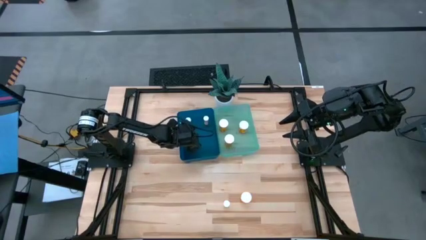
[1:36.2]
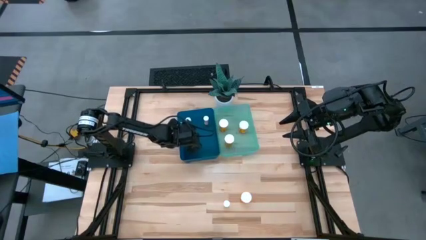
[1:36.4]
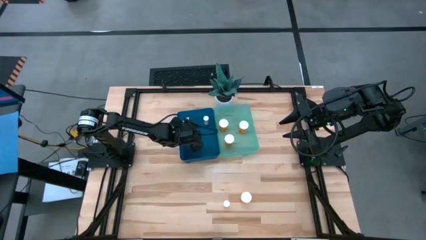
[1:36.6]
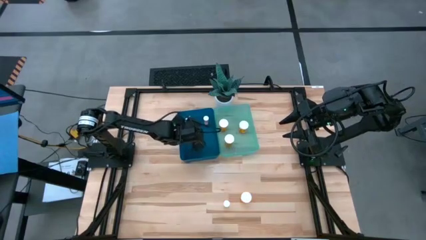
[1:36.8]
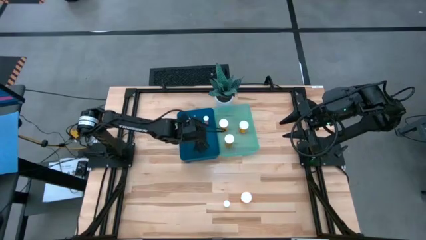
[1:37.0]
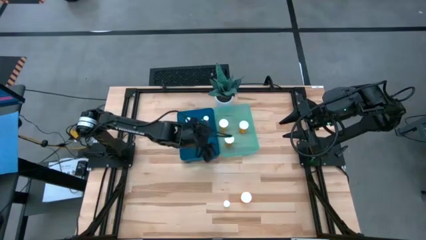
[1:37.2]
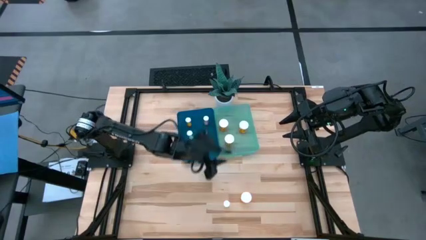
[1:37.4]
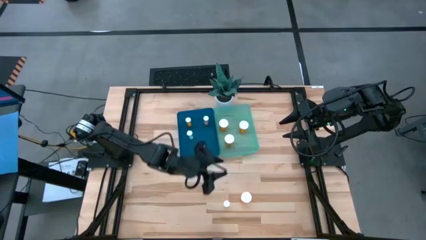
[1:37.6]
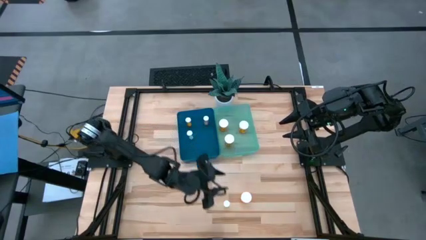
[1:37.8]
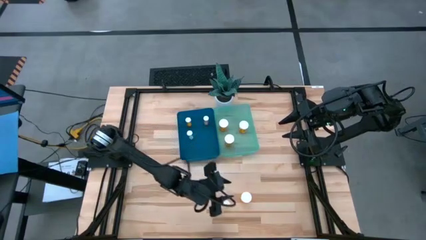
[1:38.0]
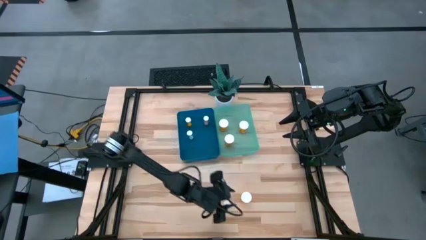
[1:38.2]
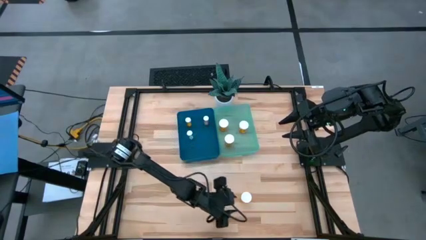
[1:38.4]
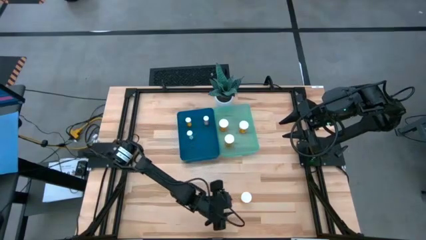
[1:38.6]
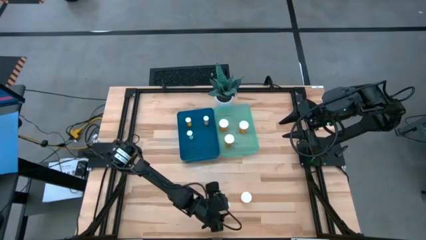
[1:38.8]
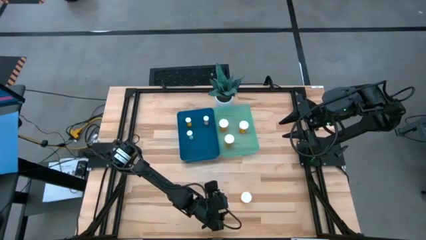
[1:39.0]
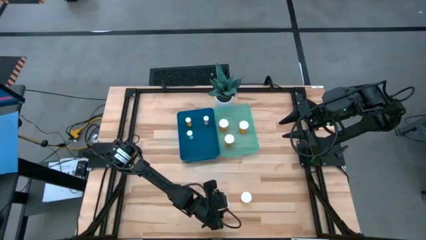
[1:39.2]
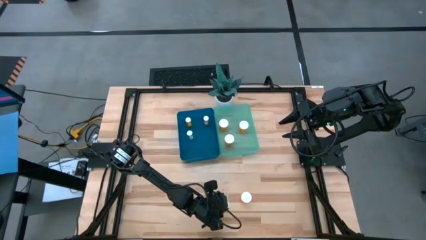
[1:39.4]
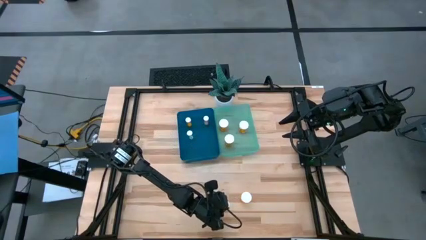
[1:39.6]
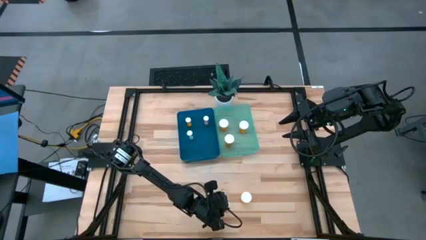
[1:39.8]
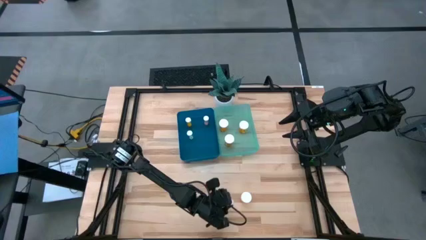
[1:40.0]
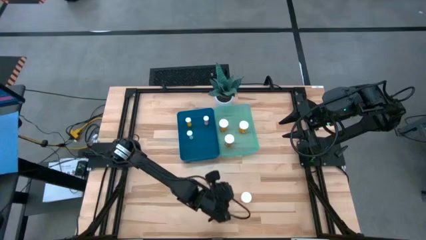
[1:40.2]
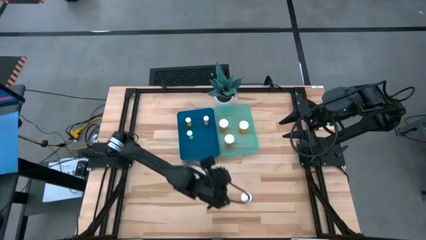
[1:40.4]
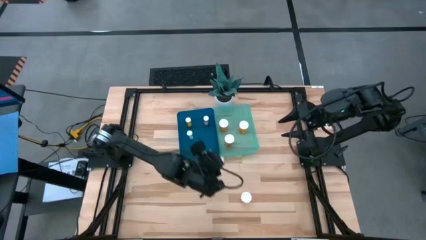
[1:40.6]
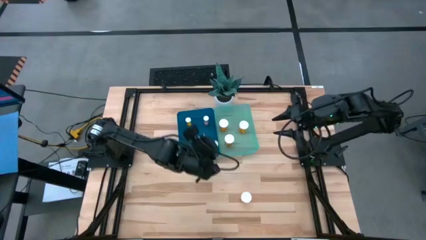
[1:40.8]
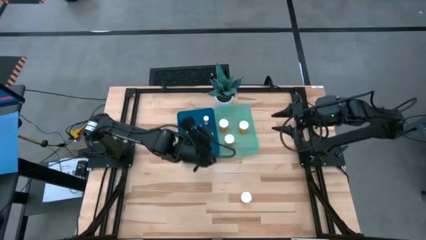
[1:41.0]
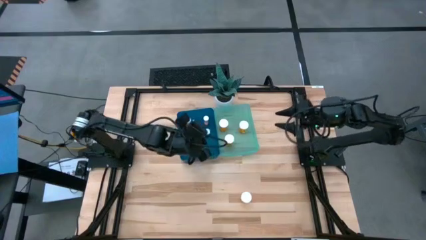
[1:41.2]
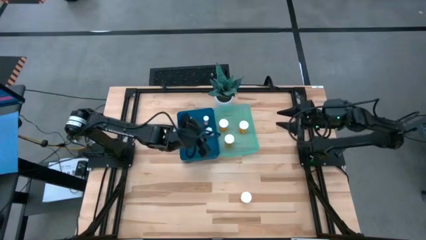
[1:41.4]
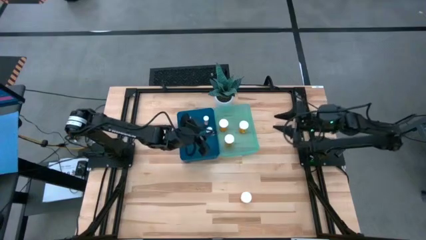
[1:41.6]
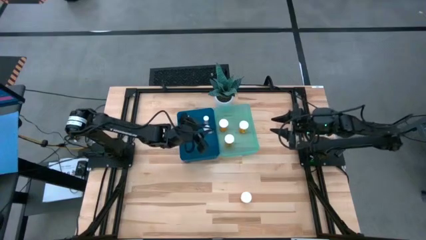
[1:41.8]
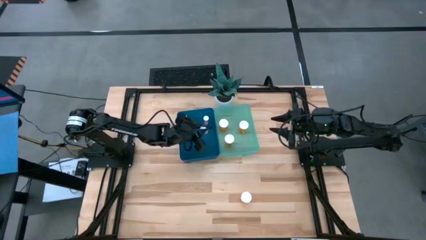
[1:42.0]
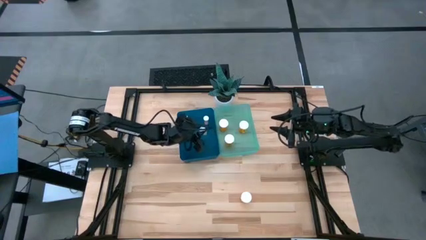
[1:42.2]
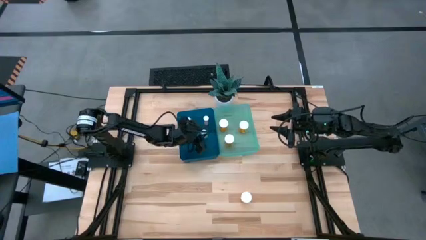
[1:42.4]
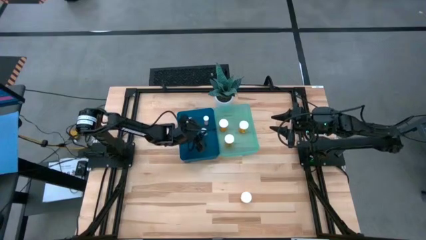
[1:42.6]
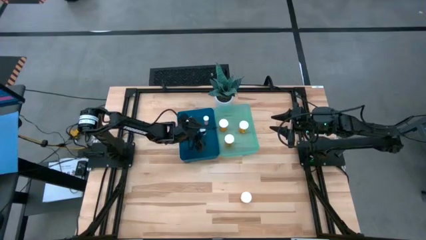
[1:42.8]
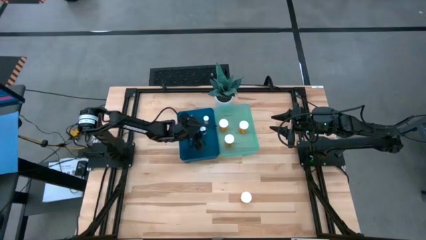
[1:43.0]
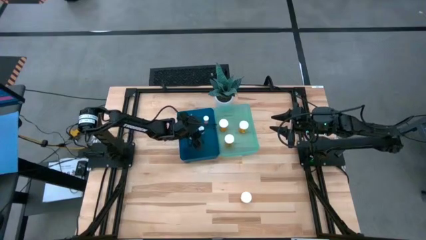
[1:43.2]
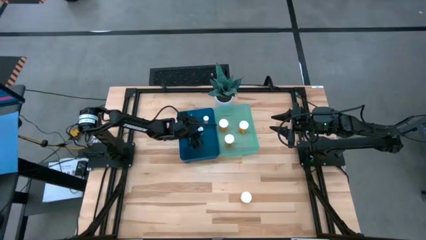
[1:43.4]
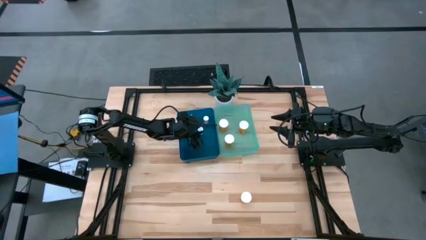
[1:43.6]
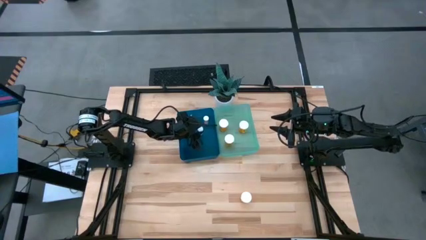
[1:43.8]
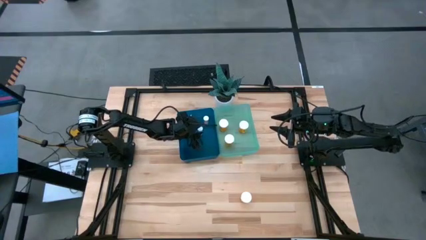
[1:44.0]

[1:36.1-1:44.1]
Task: Pick and place medicine bottles into bin by pill shape (circle, oval)
Put the small yellow tablet bottle into the blue bin

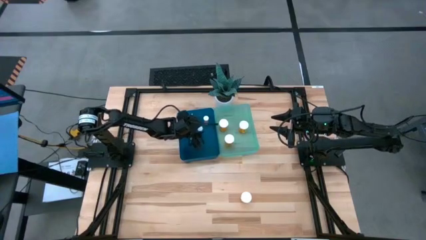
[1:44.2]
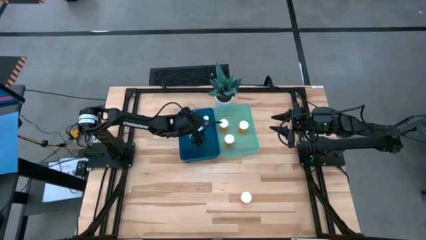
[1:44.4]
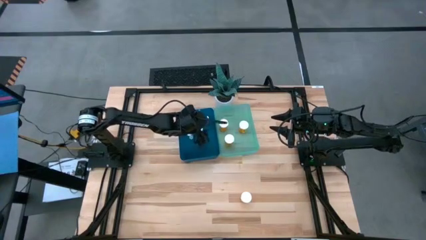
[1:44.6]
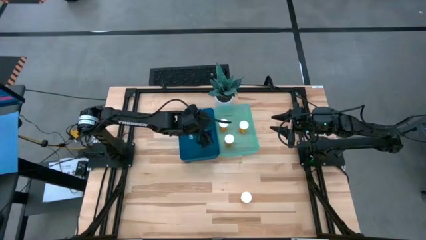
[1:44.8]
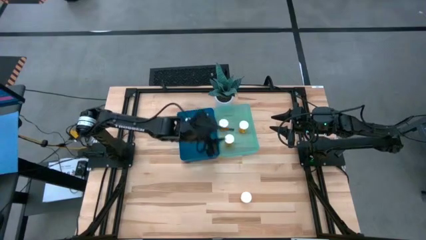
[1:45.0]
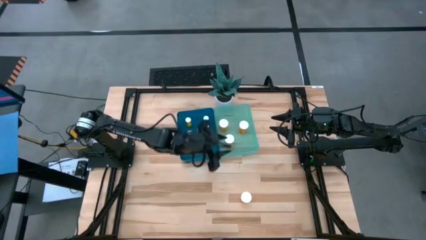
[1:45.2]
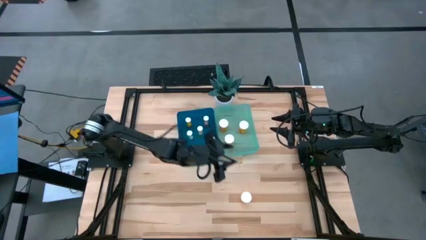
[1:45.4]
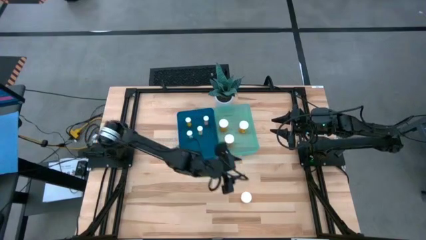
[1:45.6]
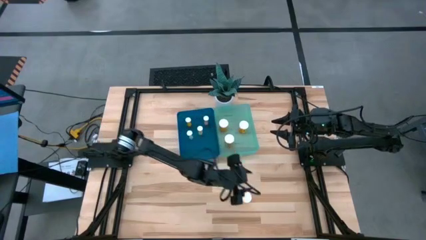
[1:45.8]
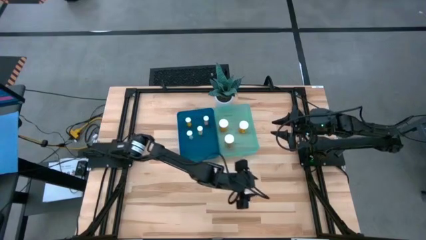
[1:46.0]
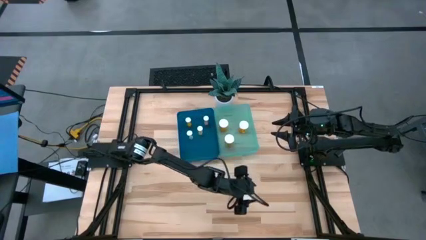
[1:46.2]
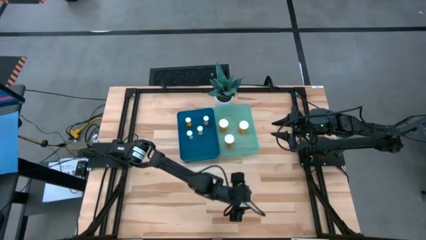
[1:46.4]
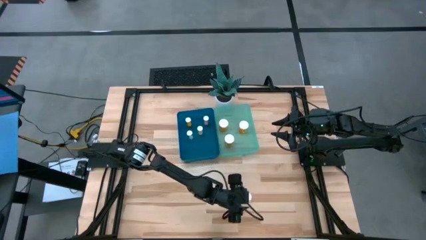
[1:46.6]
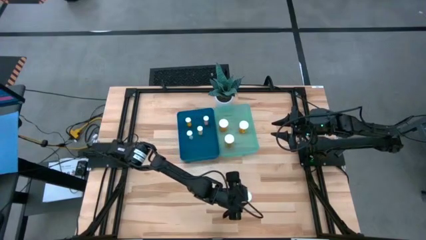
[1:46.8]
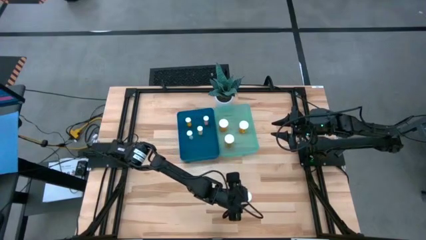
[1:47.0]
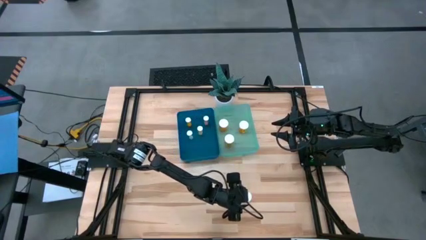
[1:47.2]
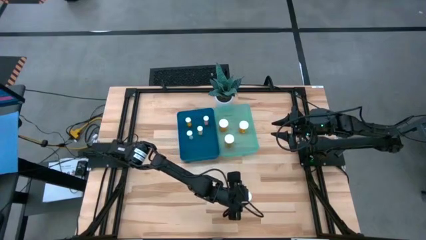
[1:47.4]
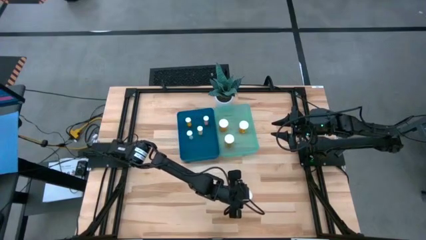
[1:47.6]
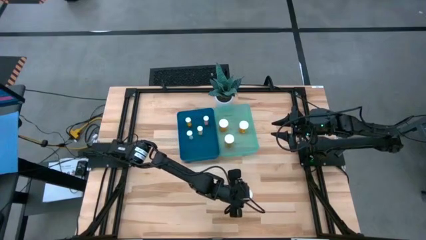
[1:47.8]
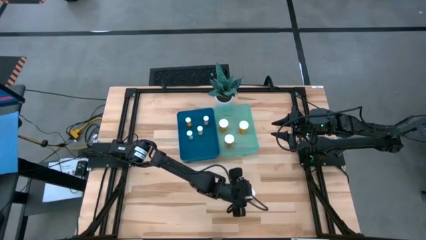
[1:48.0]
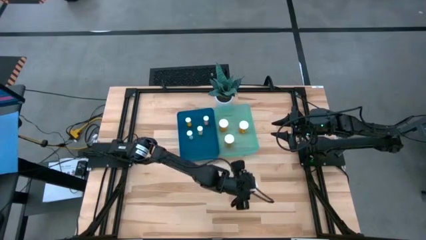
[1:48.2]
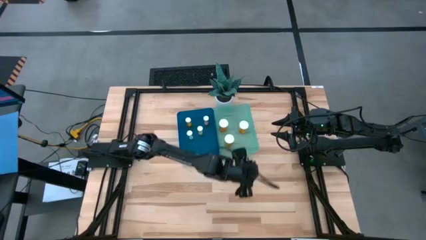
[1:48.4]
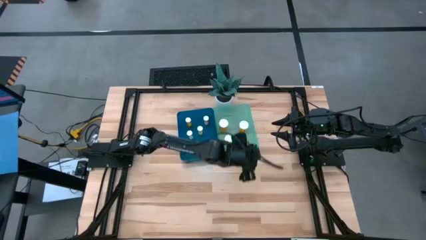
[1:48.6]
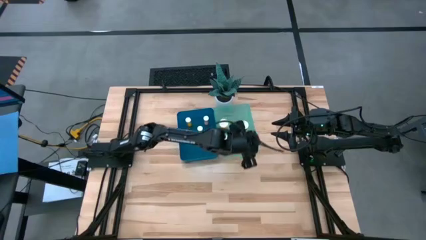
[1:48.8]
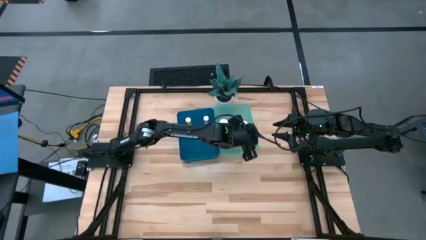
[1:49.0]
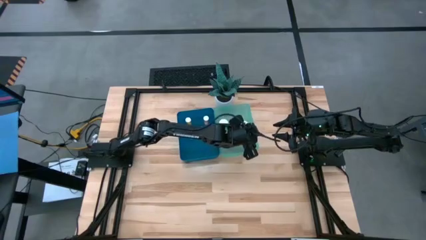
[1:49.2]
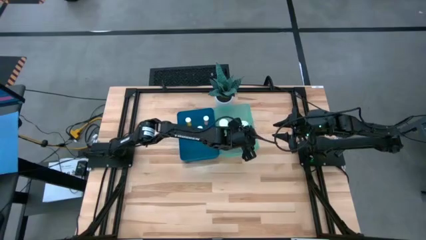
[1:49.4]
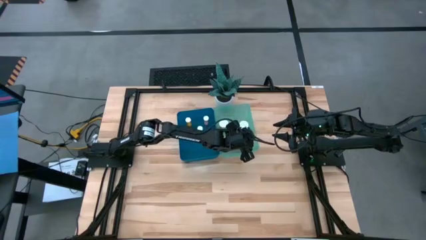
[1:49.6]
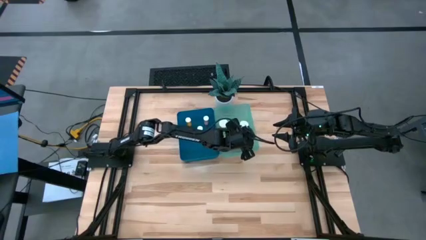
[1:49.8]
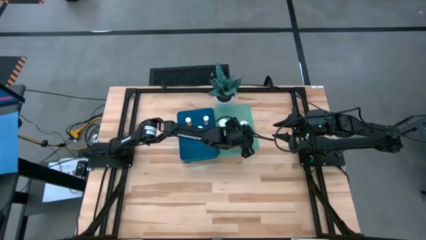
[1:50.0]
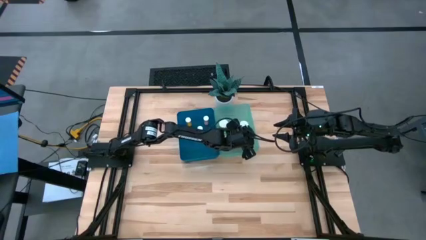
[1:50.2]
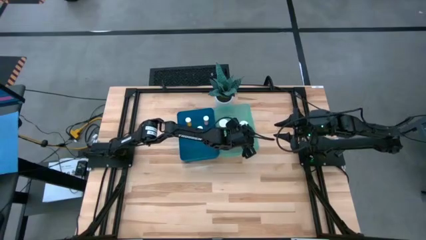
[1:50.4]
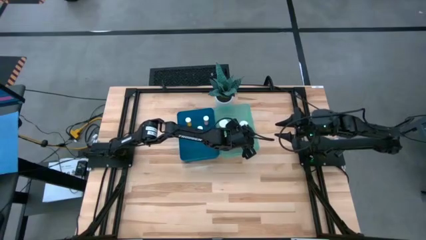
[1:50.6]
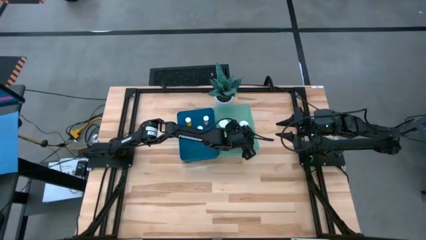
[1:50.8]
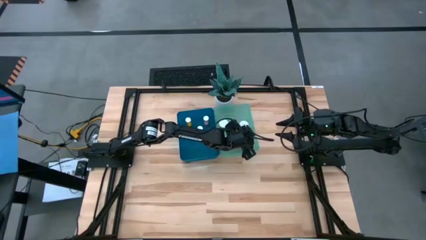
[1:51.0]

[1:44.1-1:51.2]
Put the large orange capsule bottle into the green bin
